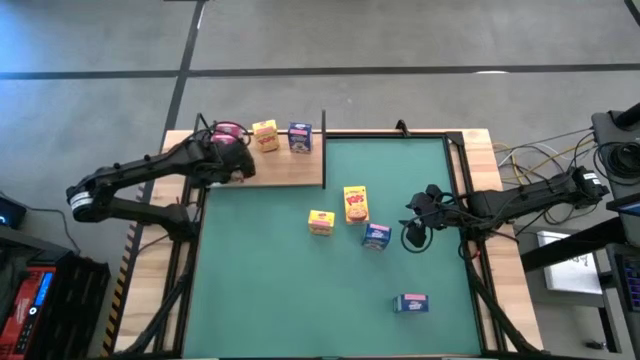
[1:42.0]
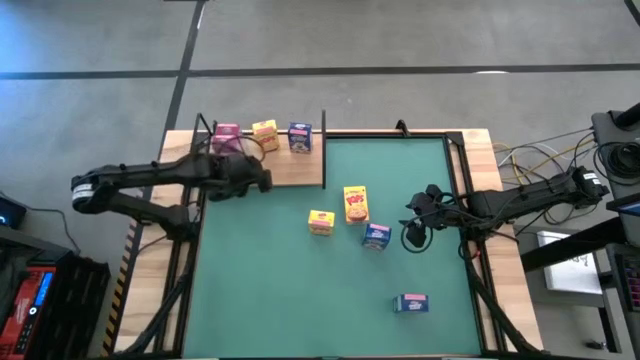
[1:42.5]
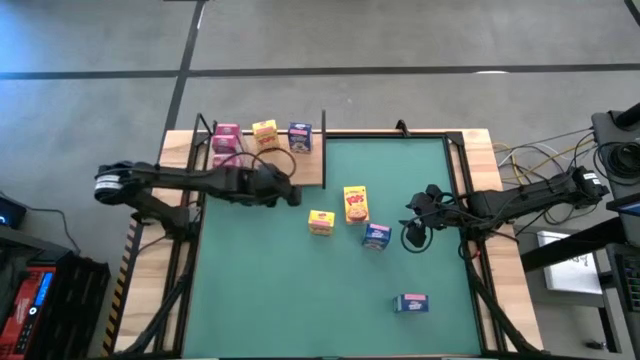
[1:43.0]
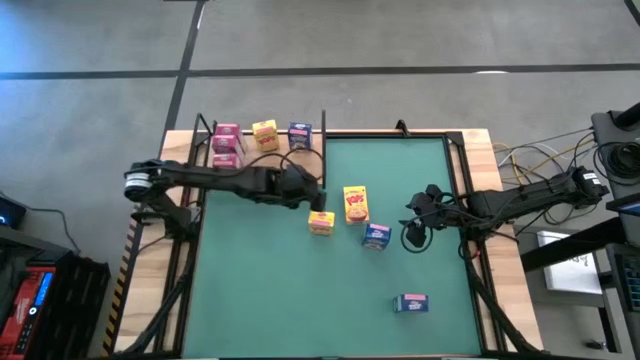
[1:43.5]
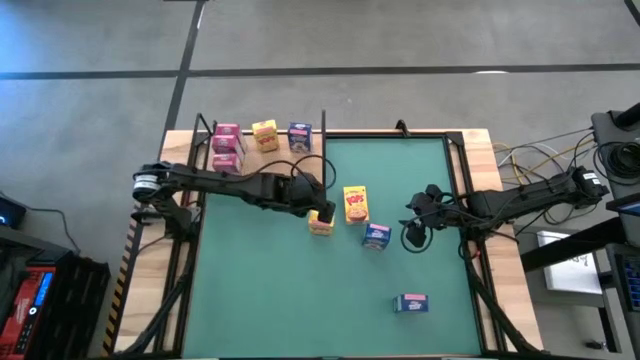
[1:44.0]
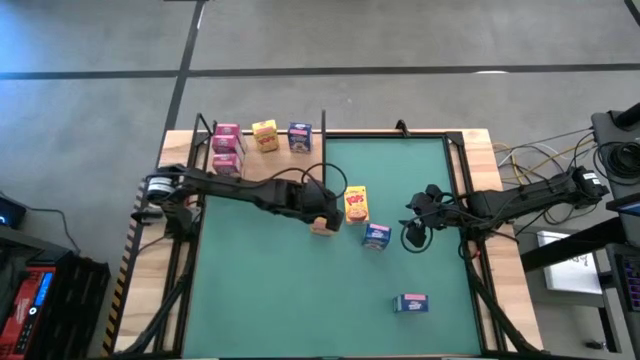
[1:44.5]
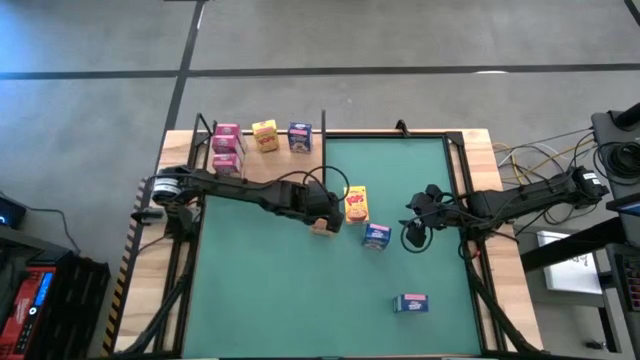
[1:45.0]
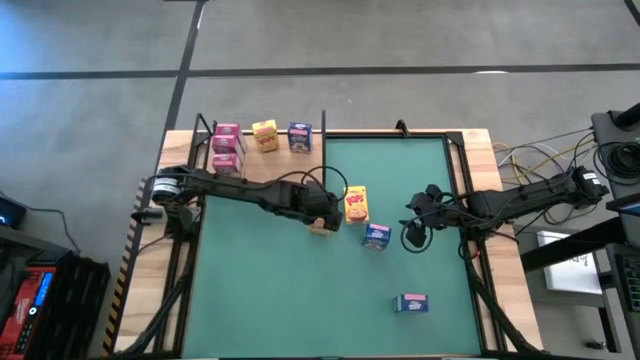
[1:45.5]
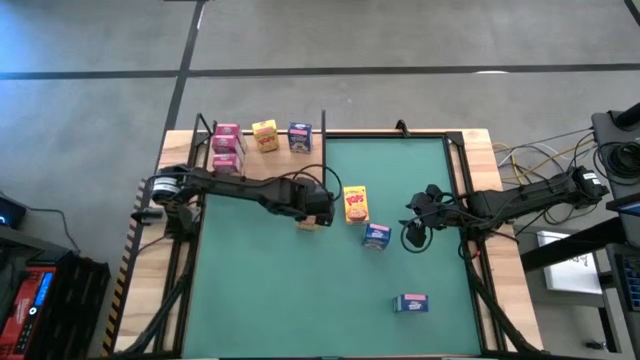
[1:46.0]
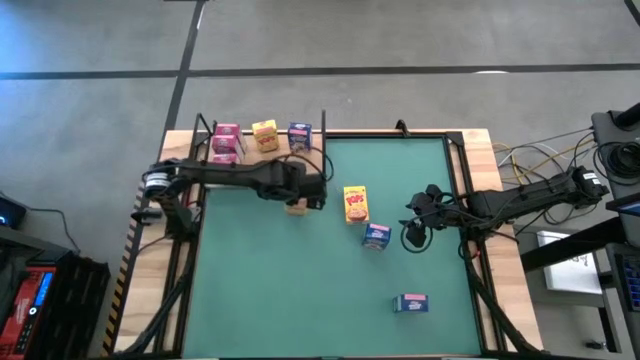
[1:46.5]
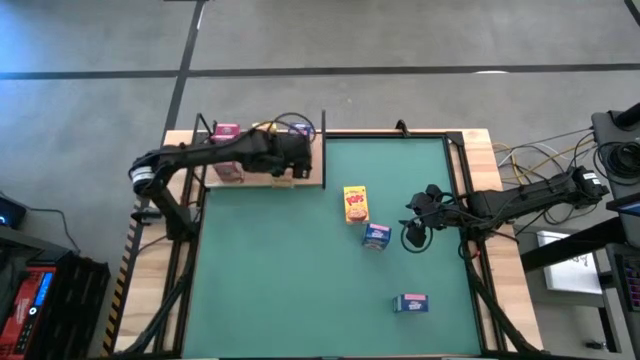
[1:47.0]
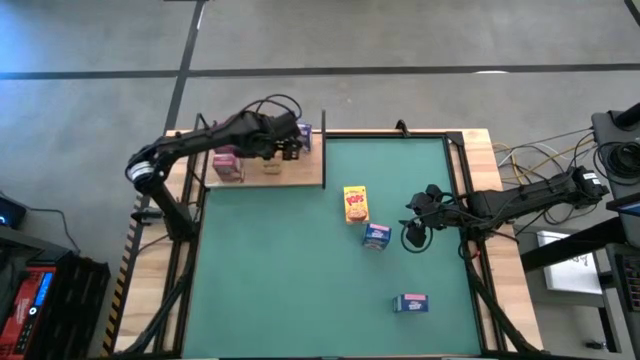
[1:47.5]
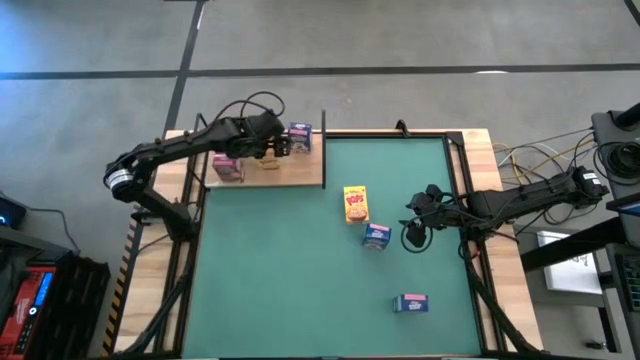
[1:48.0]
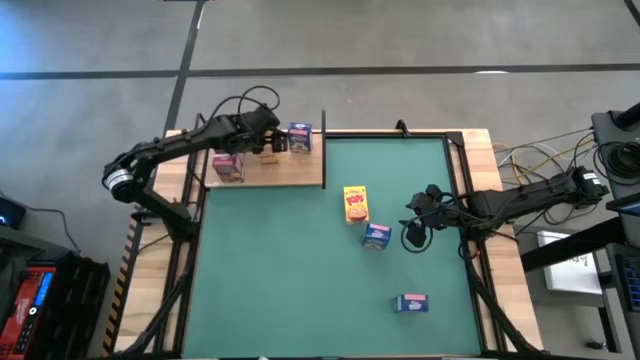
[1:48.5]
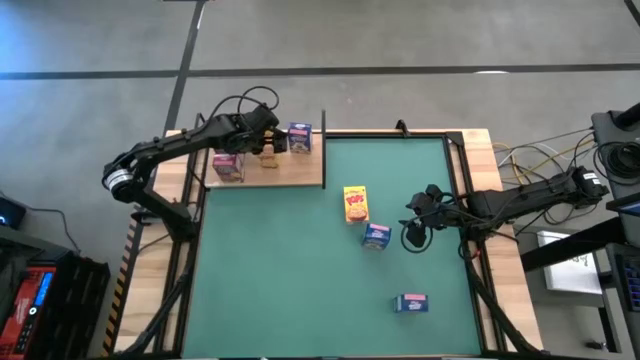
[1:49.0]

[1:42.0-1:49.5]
Task: Stack cereal on shelf
Put the left yellow cereal box on the shelf aligned with the yellow cereal box

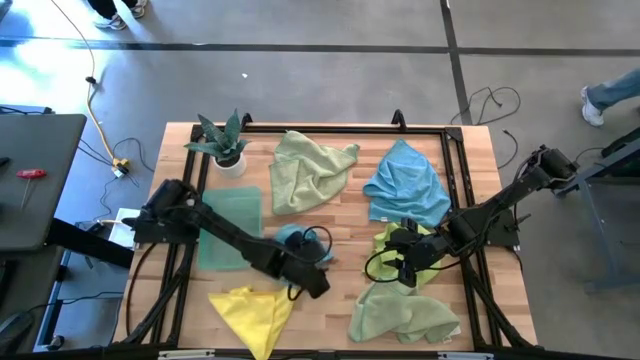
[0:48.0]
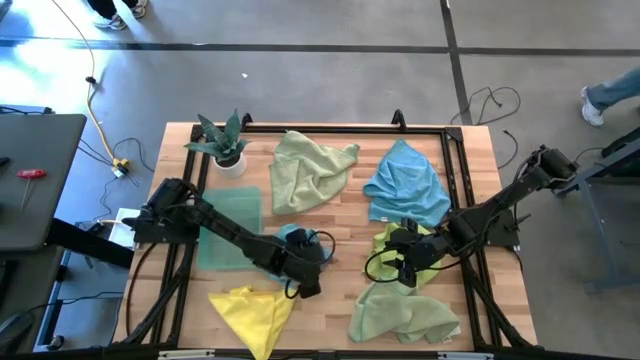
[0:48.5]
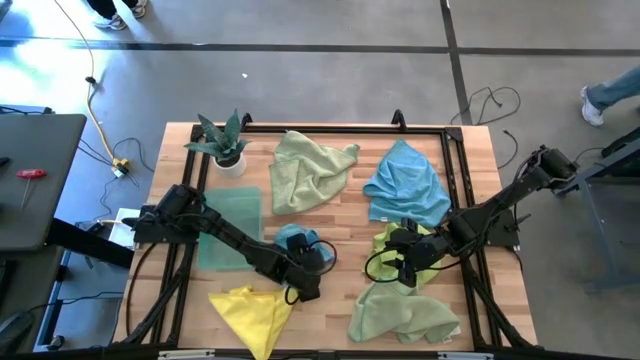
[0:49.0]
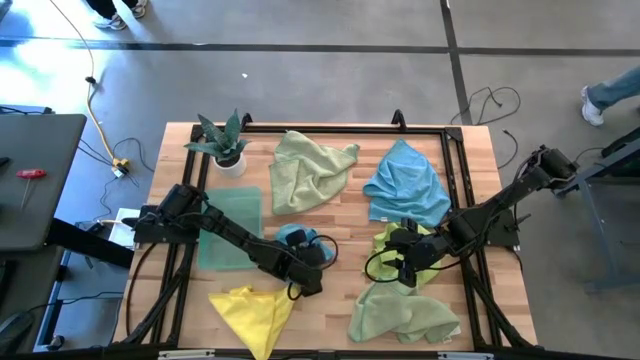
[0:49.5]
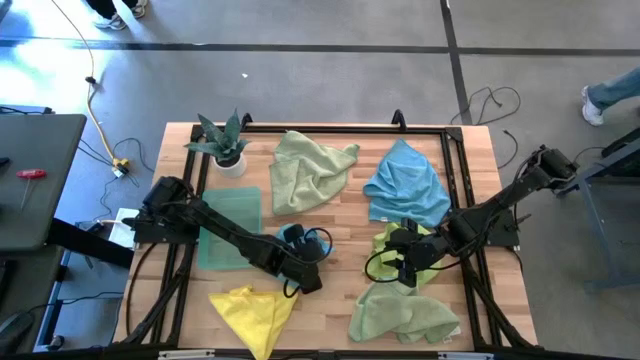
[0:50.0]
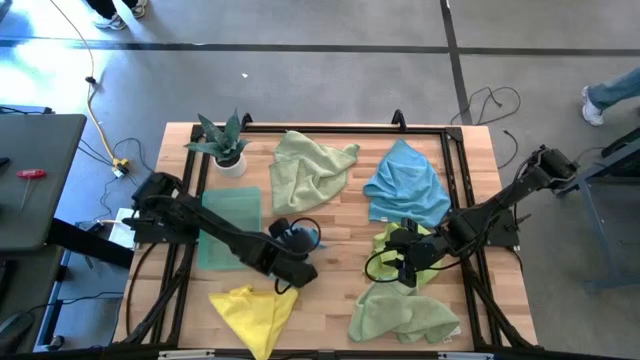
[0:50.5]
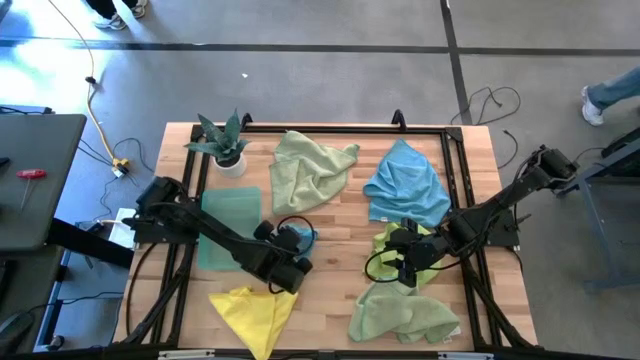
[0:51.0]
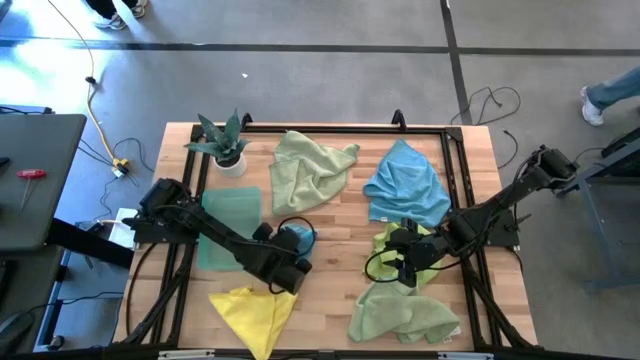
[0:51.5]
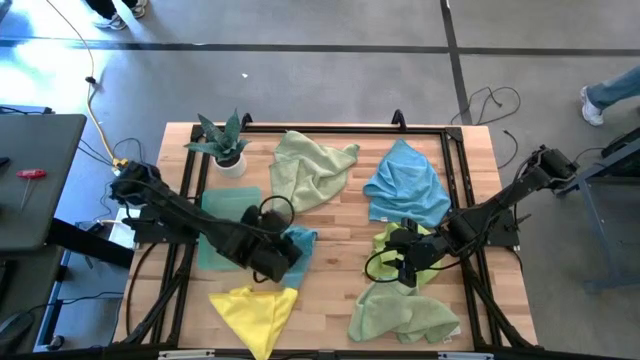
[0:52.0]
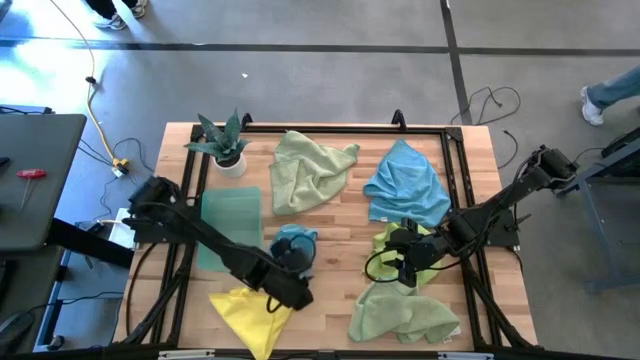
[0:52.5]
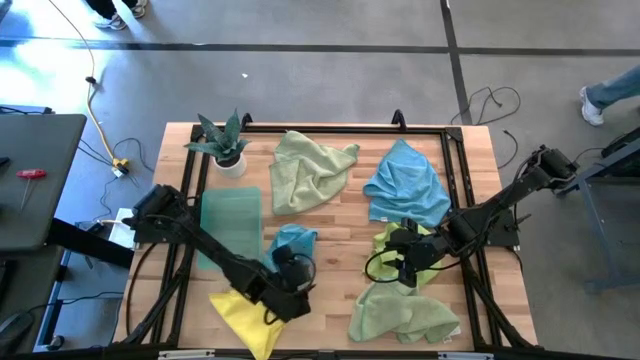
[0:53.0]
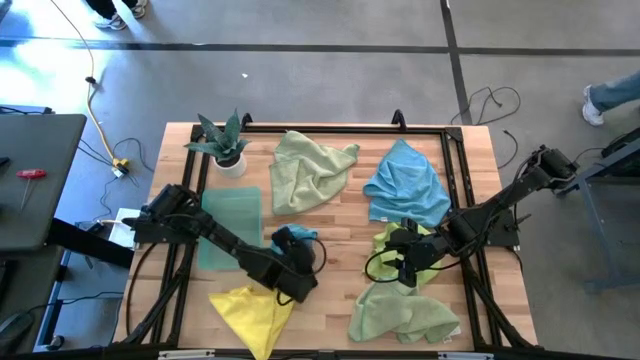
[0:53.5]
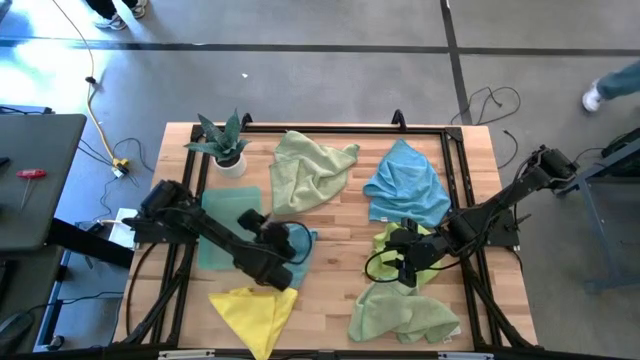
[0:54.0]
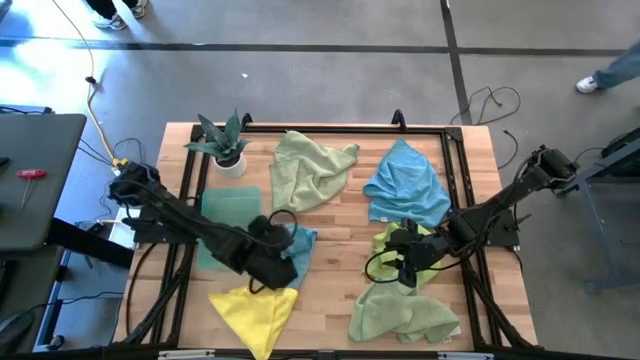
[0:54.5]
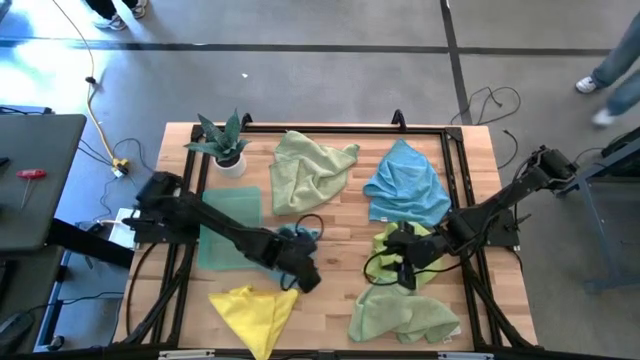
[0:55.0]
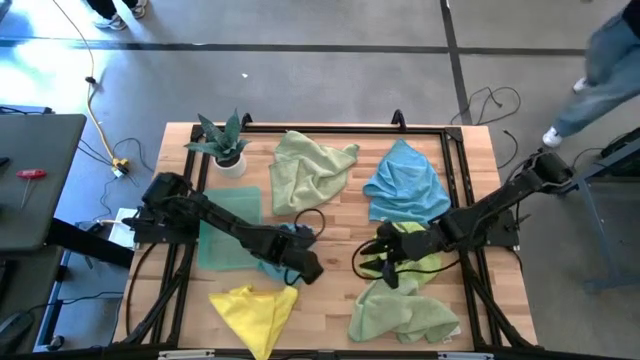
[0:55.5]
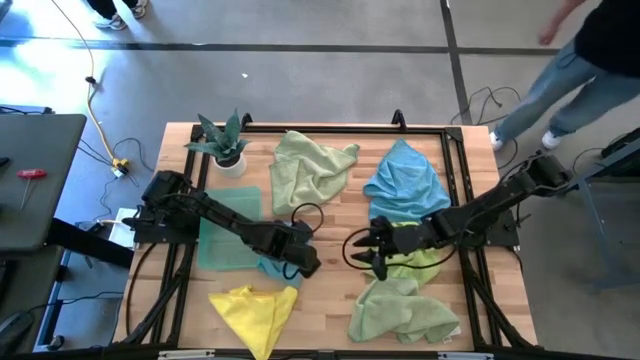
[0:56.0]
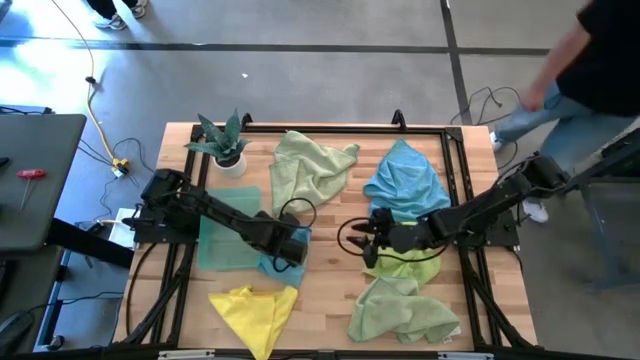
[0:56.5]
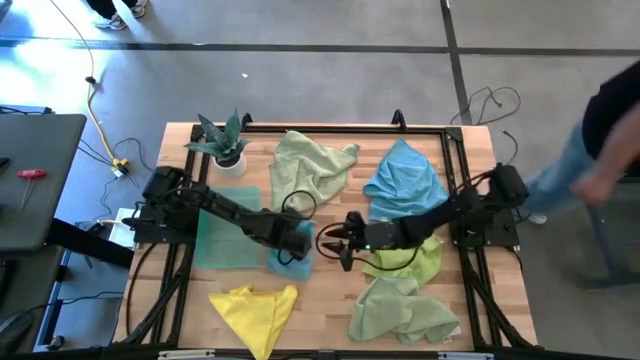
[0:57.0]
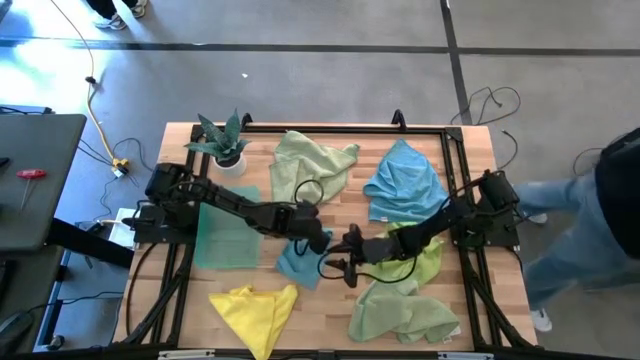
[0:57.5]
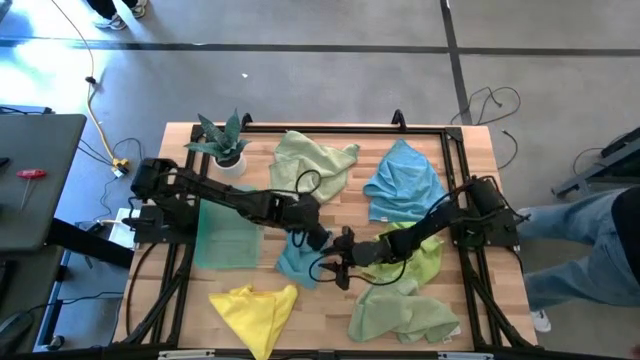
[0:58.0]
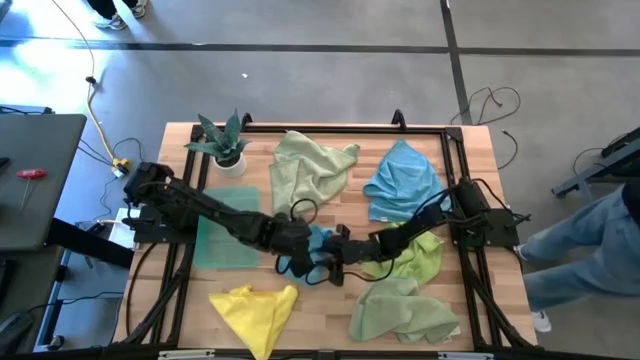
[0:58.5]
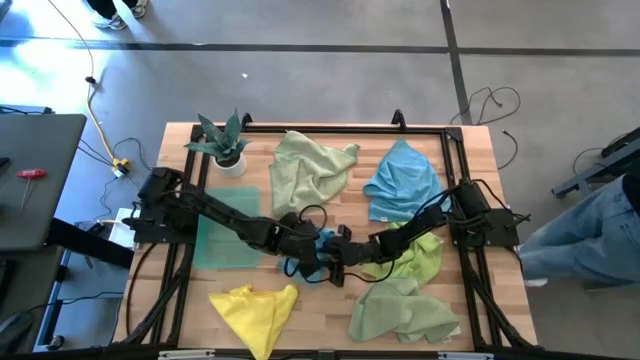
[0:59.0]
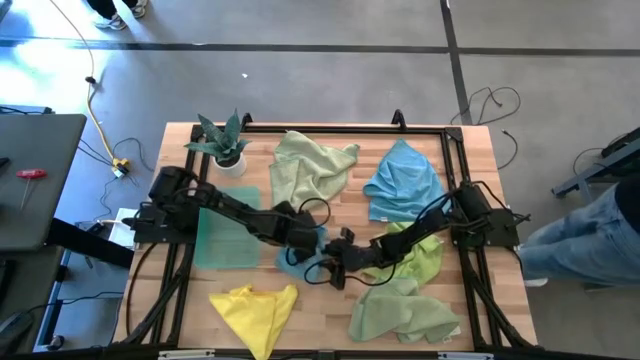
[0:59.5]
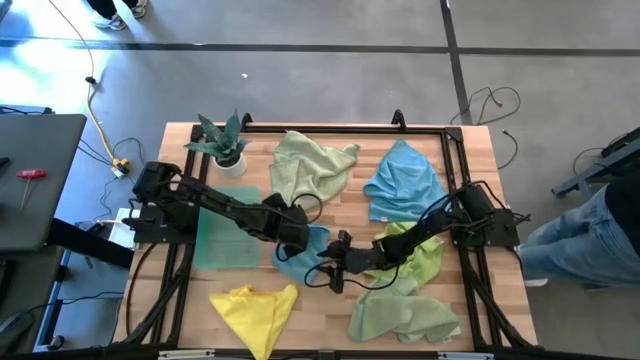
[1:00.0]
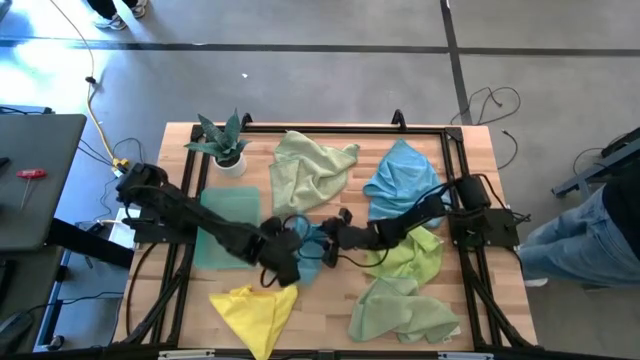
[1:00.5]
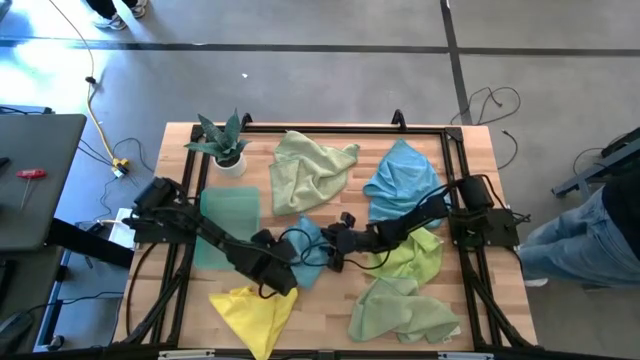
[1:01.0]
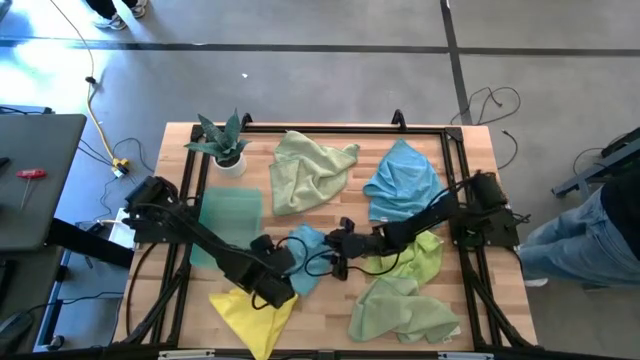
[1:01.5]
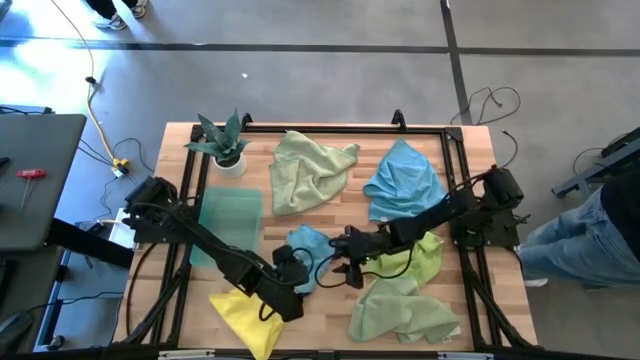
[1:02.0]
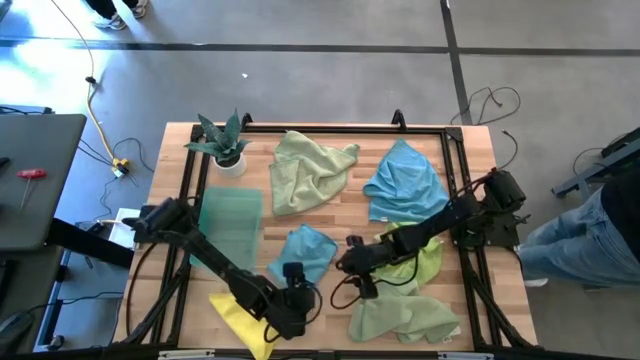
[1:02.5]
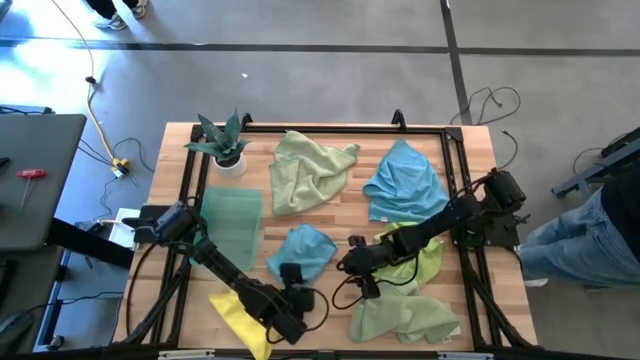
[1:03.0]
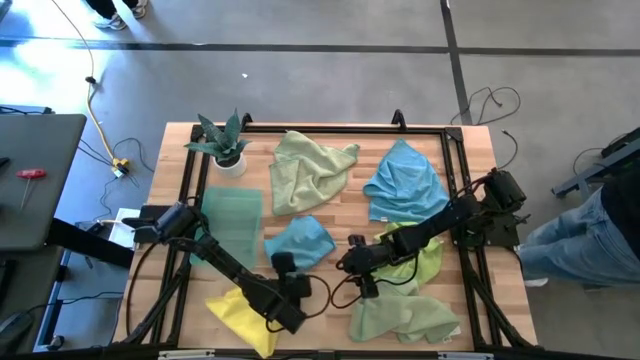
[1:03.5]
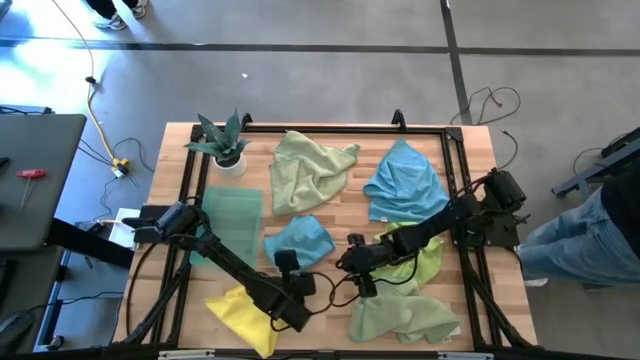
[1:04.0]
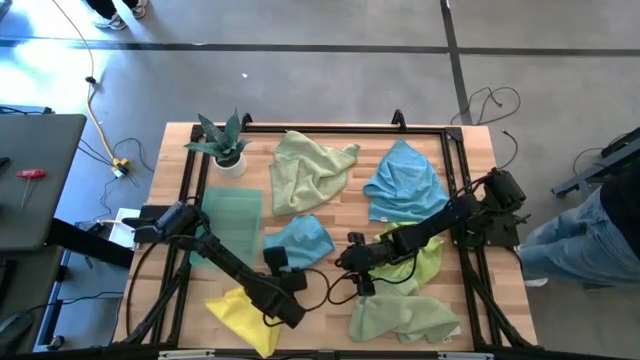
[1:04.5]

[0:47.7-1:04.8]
Task: Fold microfiber towels
Fold the bottom blue microfiber towel
